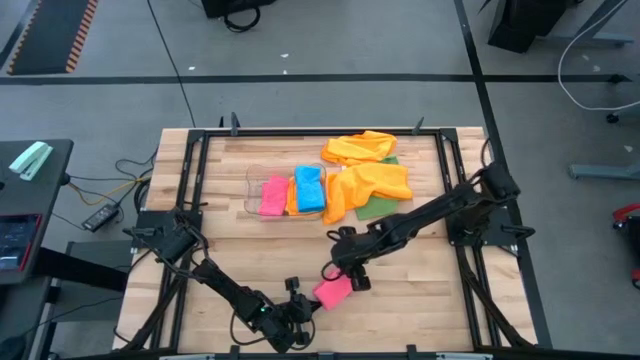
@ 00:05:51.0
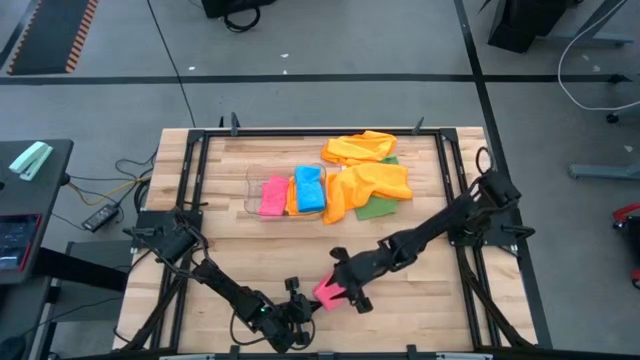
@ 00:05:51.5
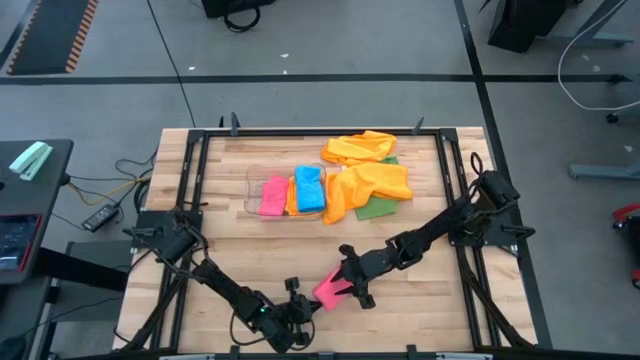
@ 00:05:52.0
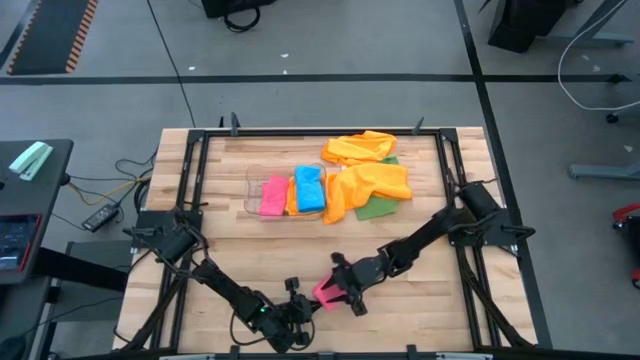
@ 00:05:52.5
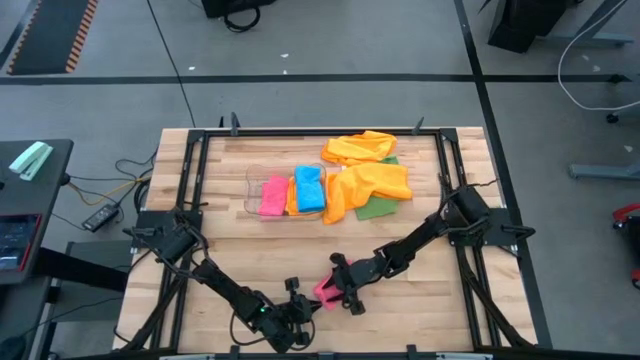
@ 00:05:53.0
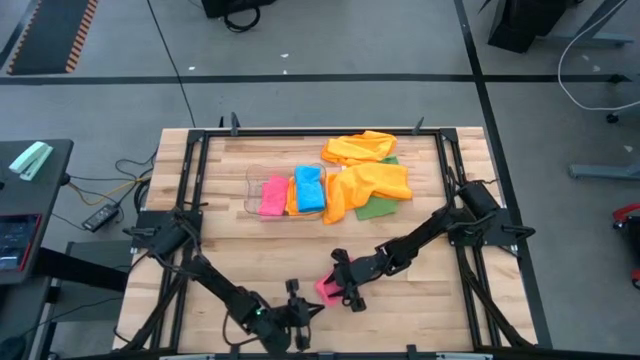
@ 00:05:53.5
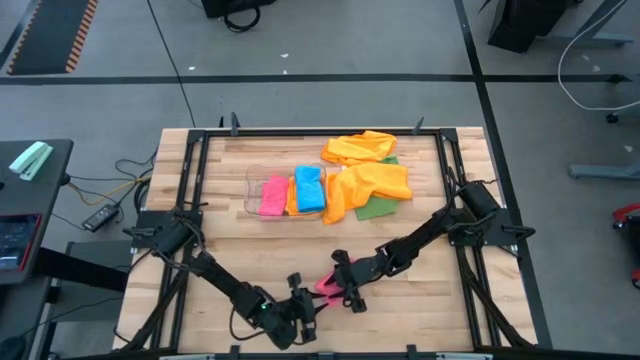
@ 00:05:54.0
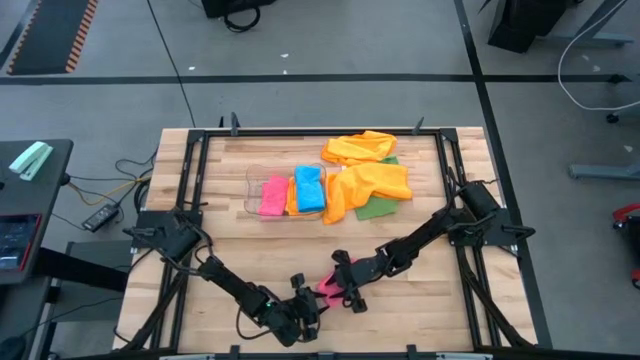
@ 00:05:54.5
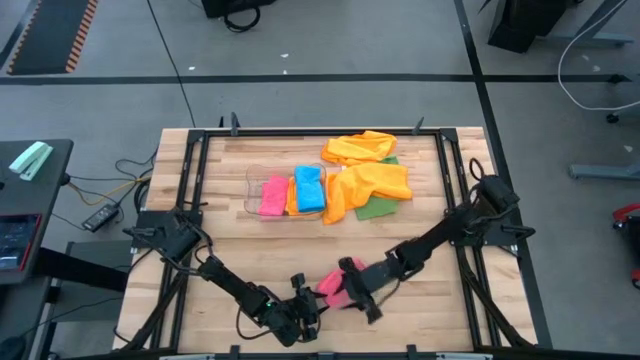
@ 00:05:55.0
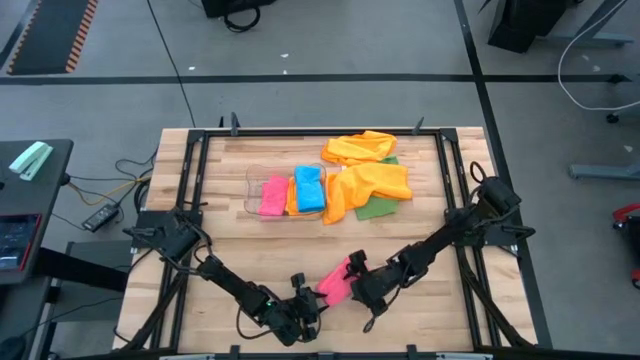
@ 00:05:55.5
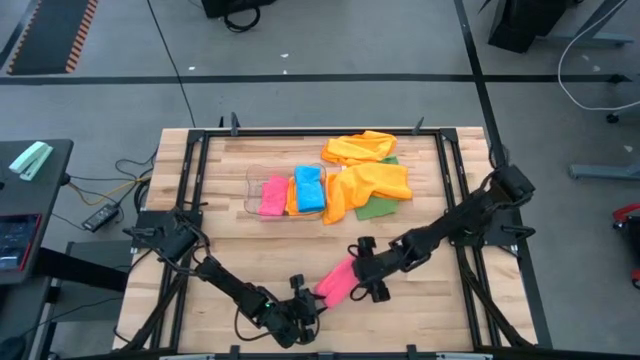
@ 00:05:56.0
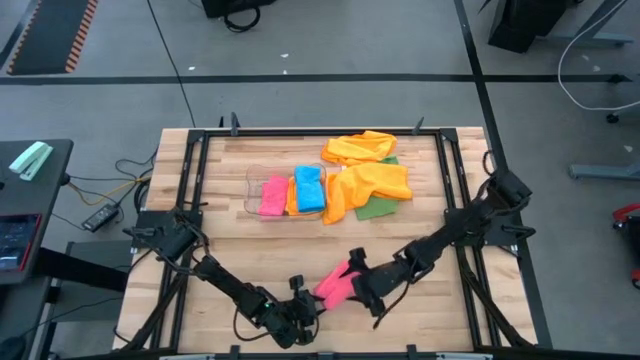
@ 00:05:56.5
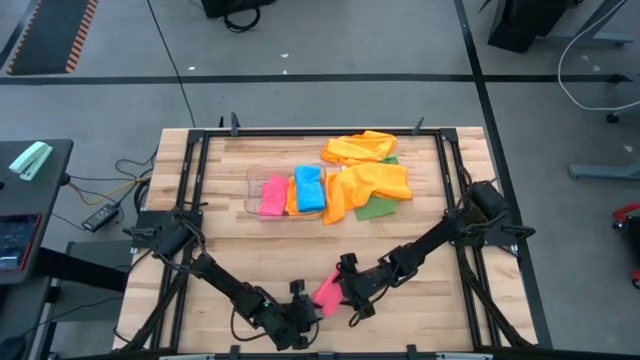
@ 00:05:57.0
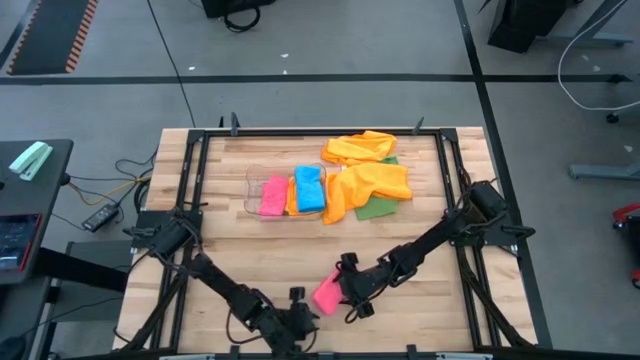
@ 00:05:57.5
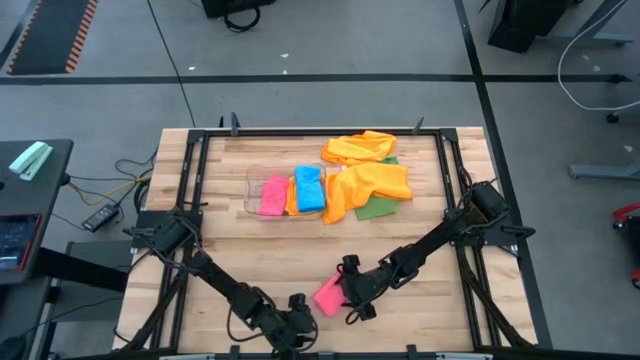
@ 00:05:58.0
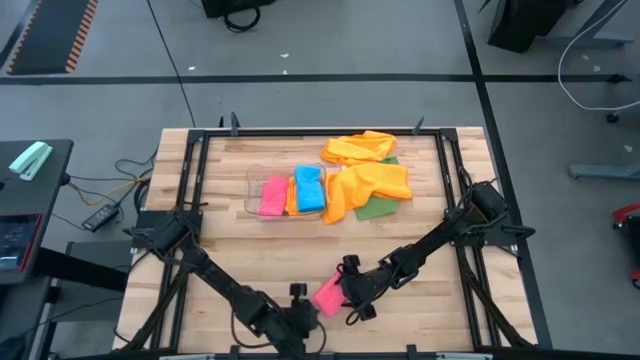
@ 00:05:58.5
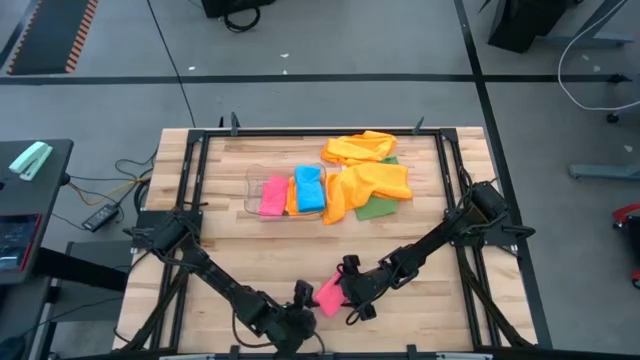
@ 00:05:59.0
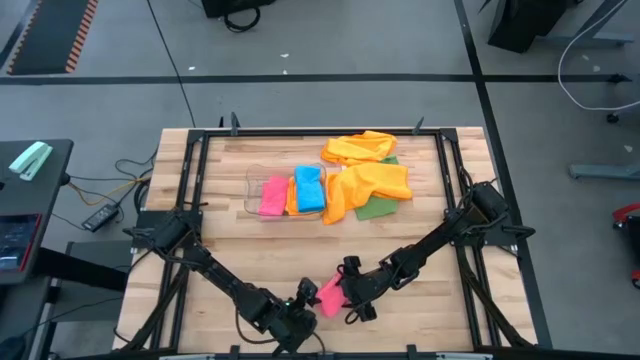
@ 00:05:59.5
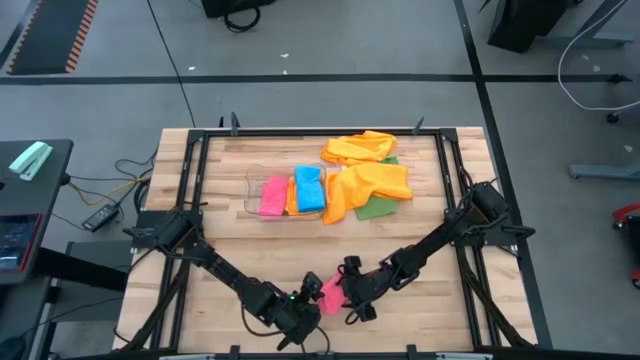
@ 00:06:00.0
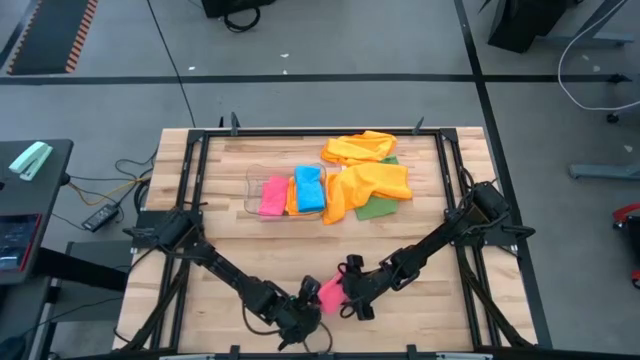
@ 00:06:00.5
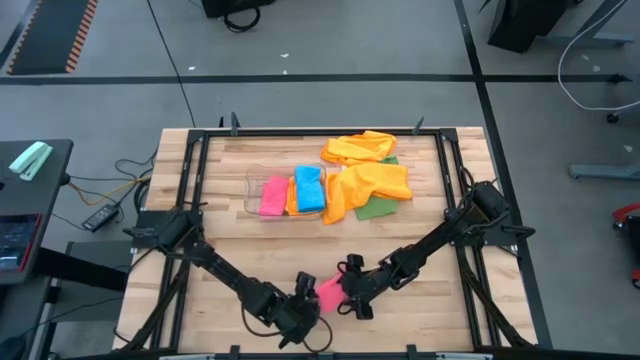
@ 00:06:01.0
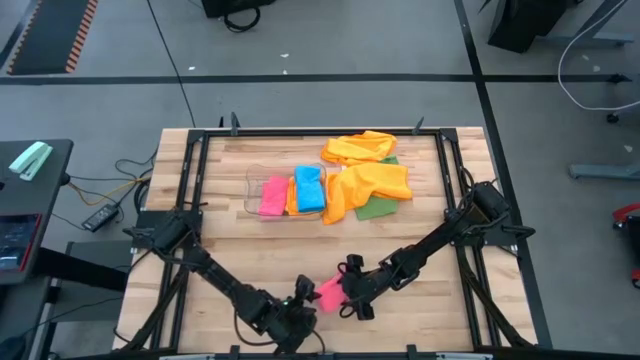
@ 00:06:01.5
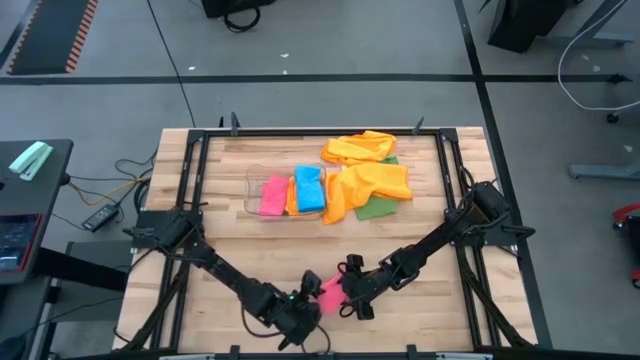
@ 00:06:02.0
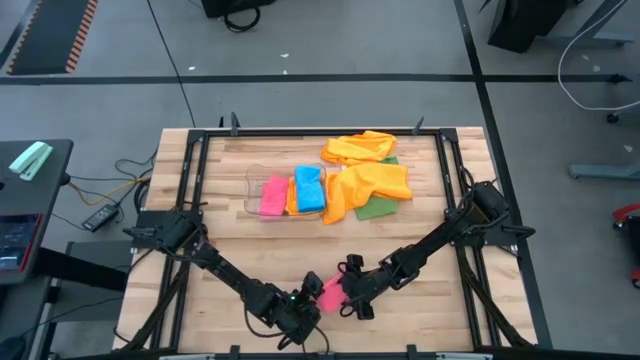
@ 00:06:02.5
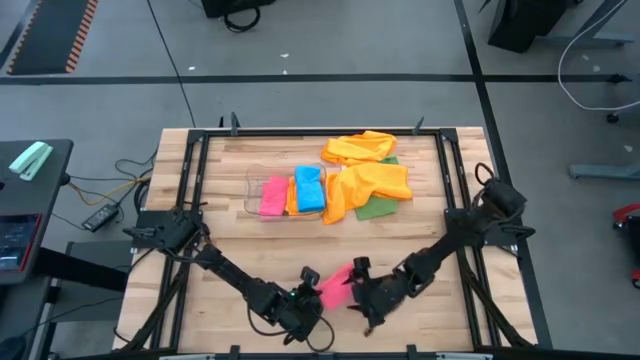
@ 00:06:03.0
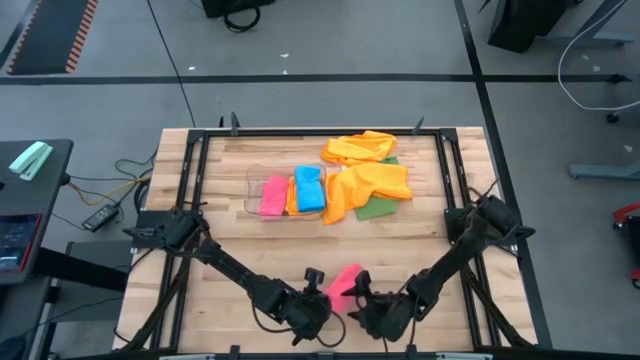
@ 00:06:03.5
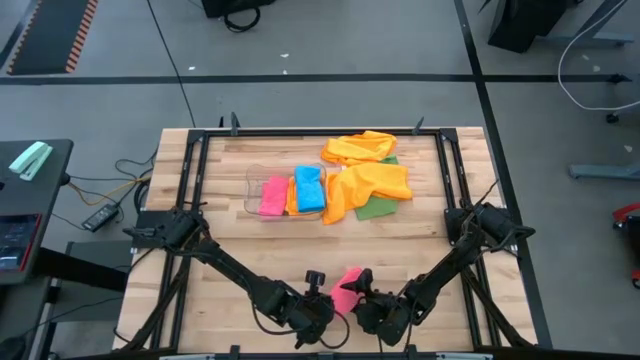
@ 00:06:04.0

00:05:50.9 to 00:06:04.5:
Task: Fold microfiber towels
Put the folded pink microfiber cloth into the transparent bin
